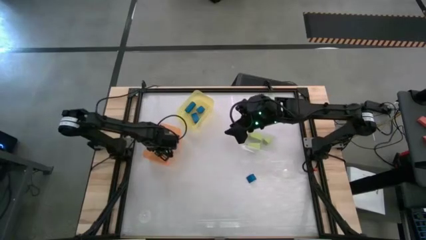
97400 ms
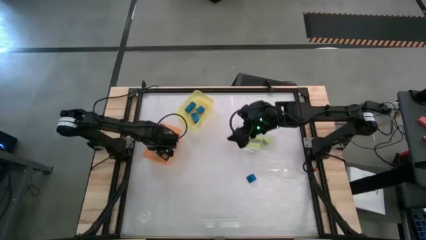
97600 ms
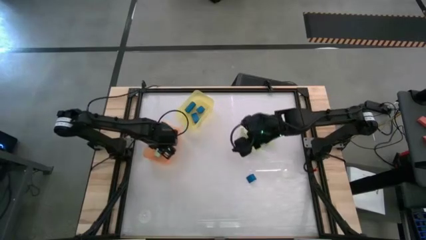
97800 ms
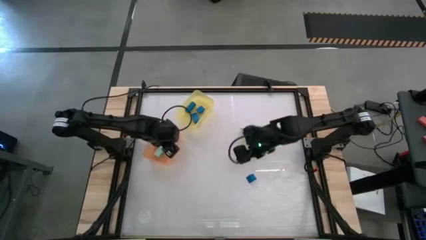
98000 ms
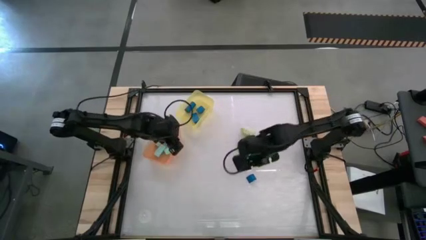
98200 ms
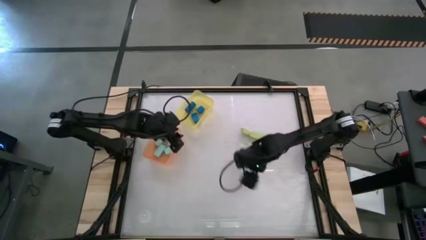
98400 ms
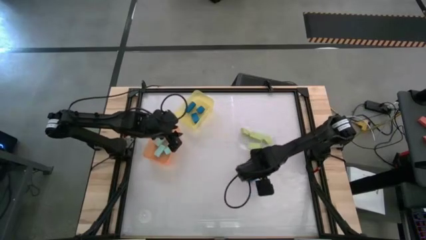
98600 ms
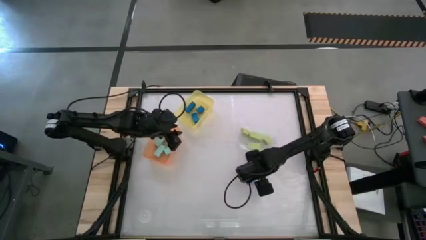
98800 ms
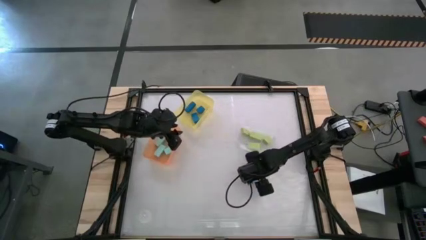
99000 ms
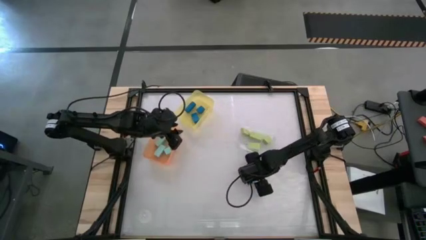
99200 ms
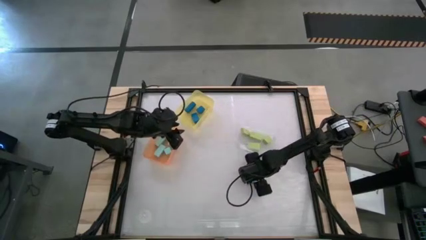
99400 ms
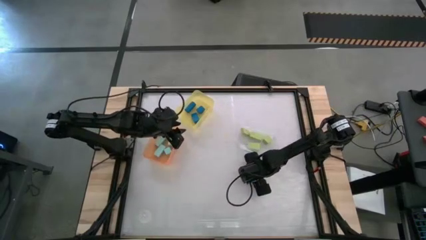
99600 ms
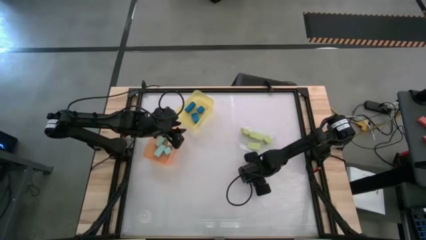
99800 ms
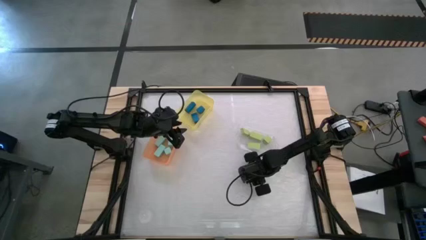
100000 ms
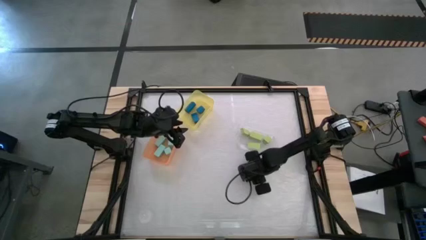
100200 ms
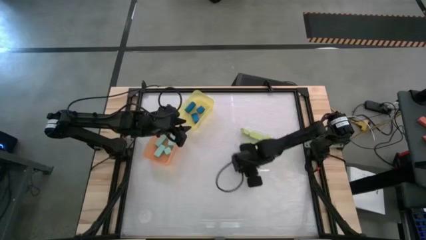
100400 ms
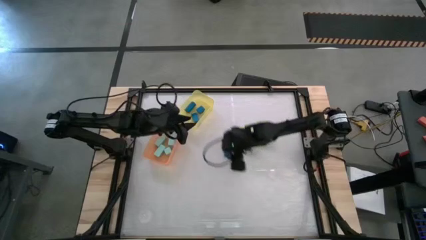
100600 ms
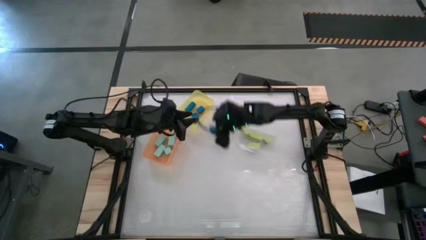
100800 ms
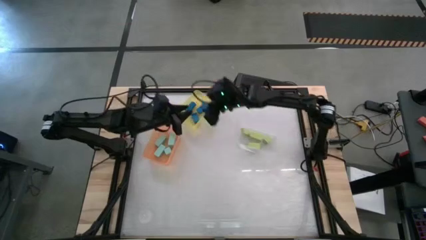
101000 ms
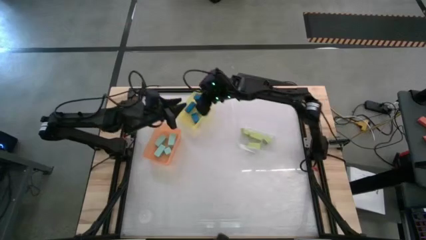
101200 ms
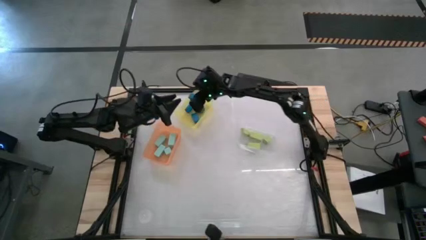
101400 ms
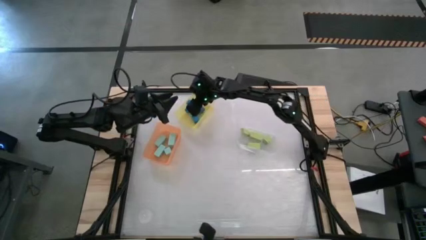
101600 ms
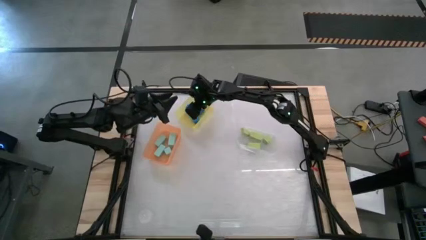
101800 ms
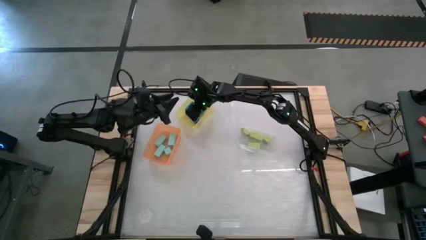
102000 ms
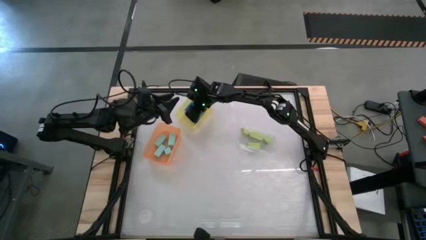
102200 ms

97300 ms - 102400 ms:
Task: Sort & place blocks by color
Put the blue block into the yellow bin

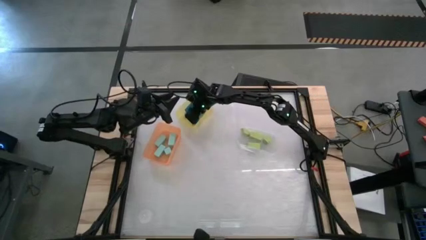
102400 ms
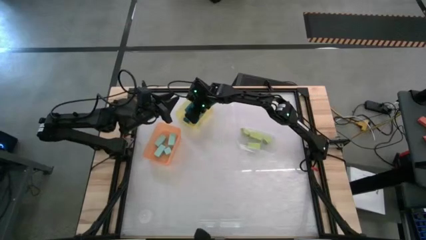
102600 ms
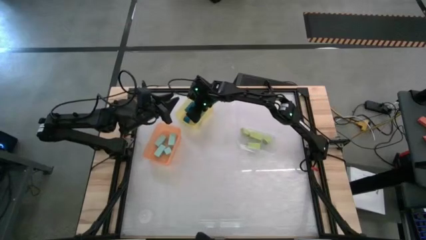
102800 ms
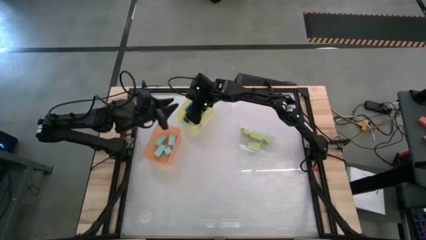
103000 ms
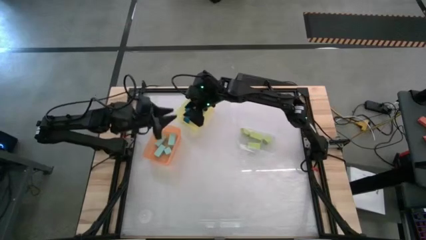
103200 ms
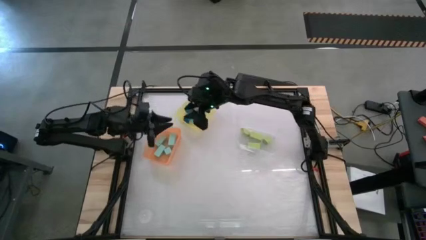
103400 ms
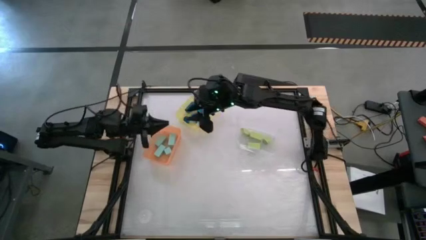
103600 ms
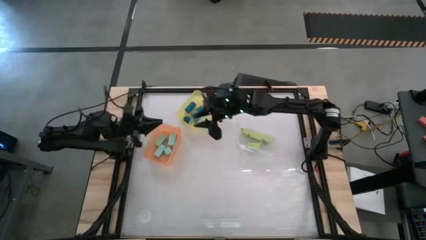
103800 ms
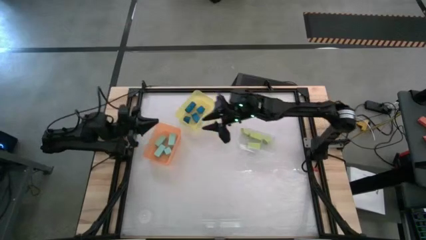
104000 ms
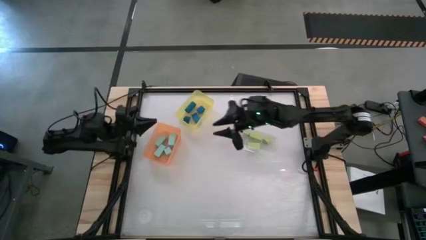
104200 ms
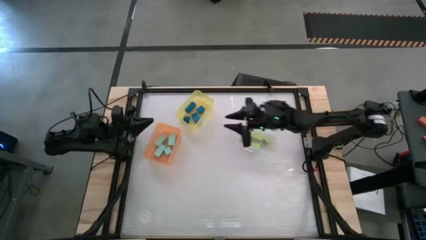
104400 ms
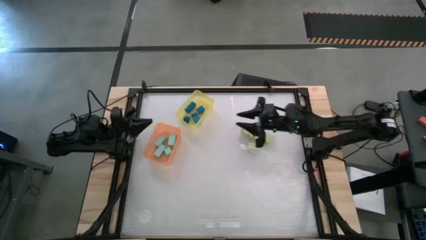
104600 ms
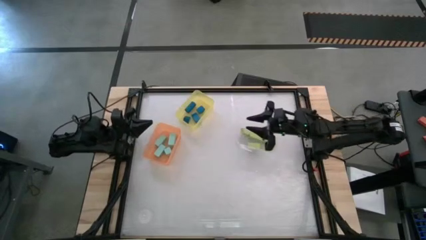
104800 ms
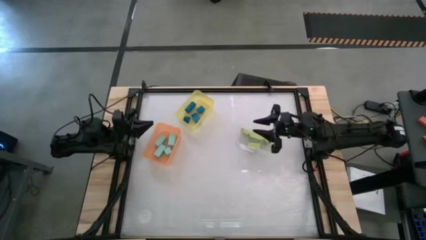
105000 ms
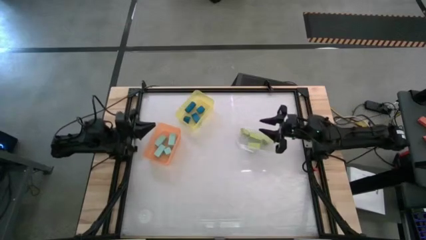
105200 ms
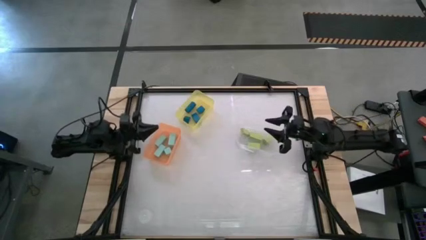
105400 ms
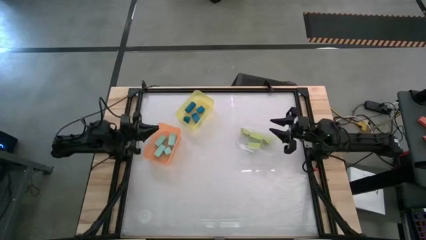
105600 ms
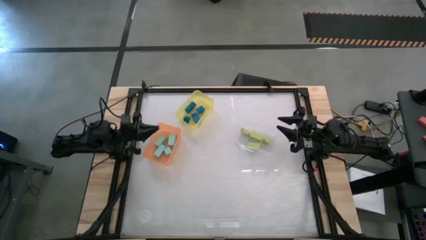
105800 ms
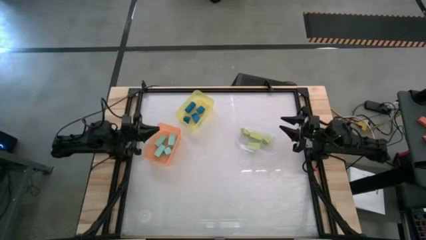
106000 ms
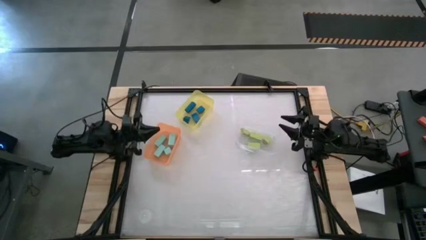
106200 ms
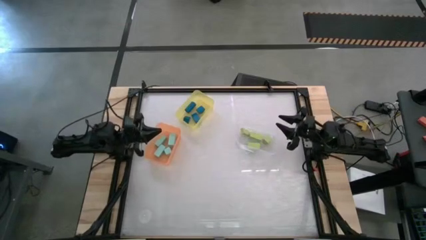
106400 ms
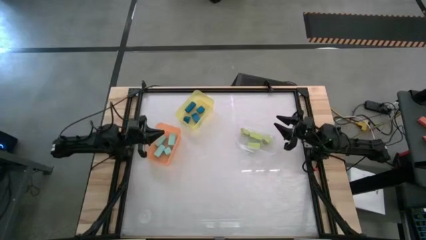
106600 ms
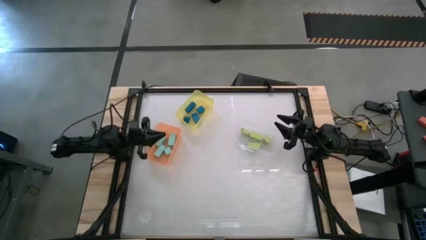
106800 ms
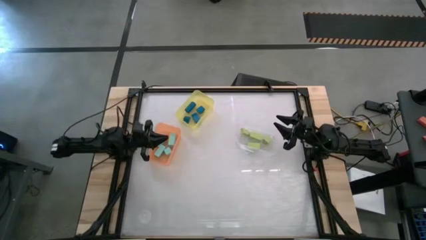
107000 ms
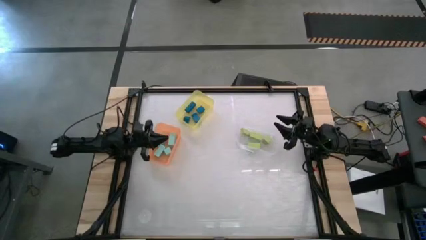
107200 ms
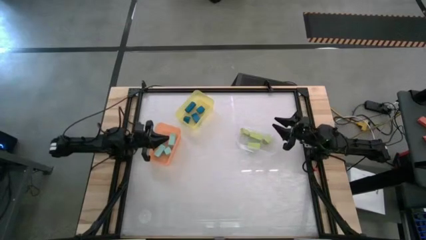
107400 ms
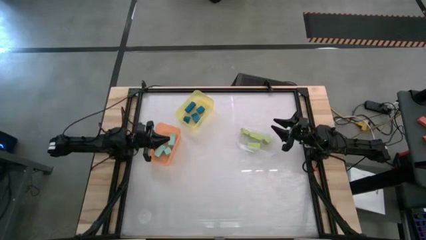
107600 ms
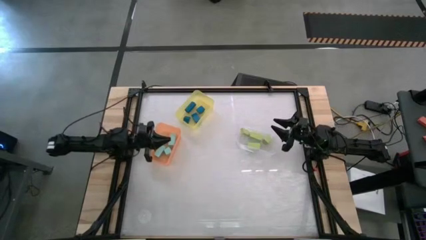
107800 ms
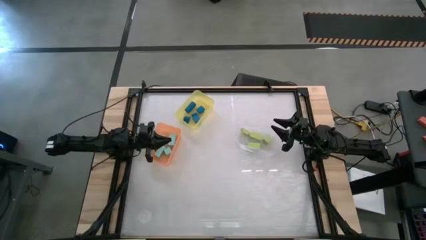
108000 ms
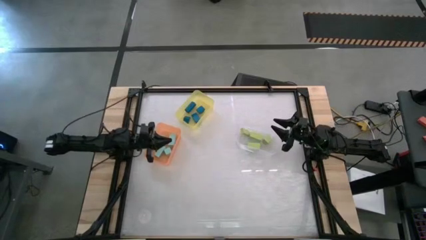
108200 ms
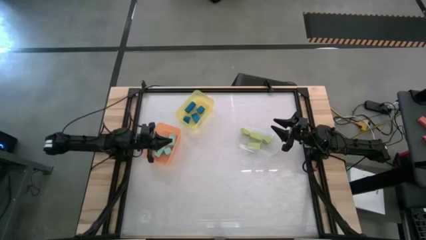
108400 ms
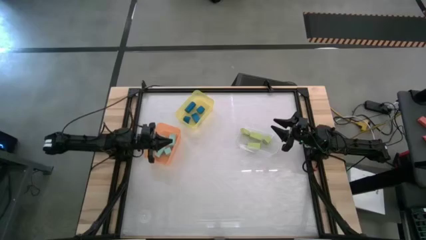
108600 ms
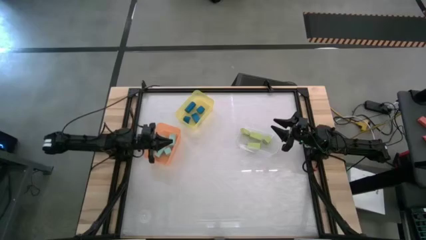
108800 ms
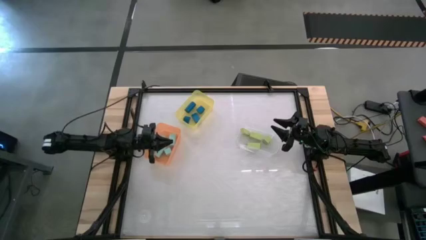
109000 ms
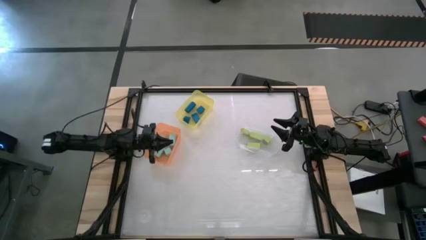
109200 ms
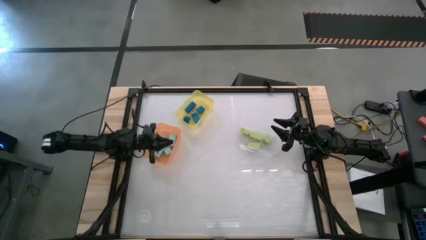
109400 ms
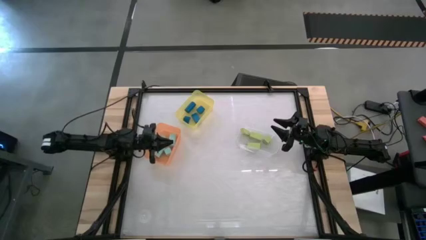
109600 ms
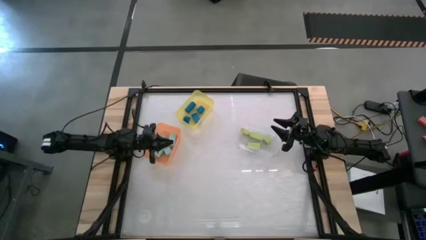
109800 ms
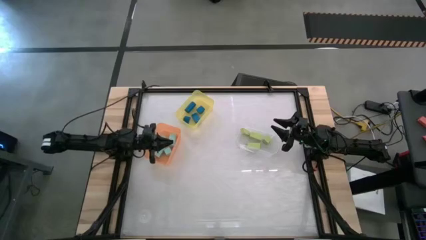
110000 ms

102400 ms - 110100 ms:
Return to Home Position
